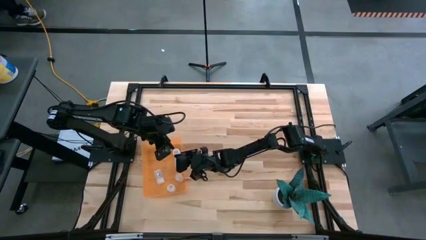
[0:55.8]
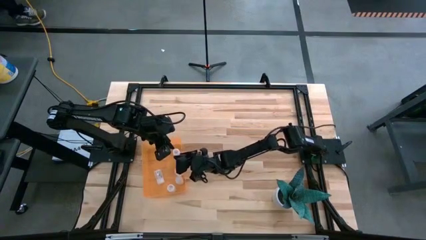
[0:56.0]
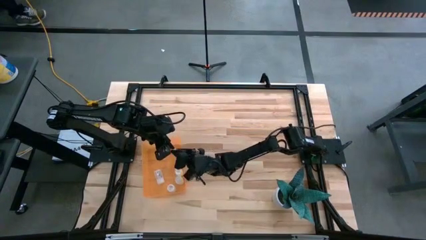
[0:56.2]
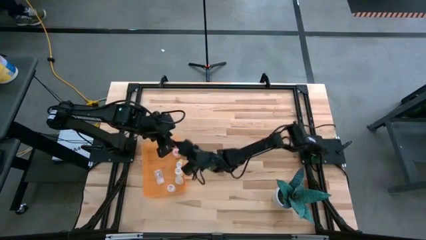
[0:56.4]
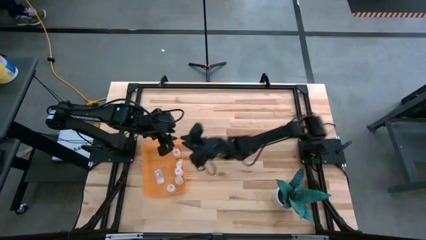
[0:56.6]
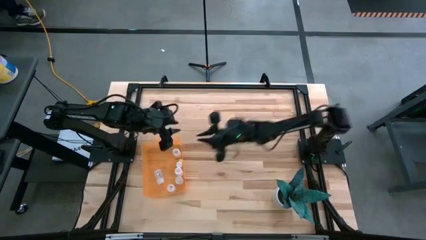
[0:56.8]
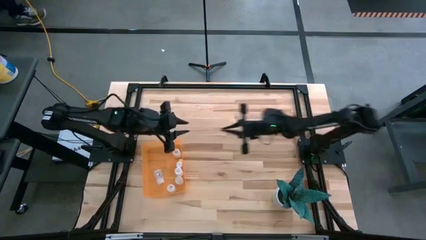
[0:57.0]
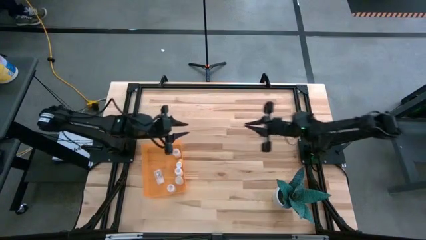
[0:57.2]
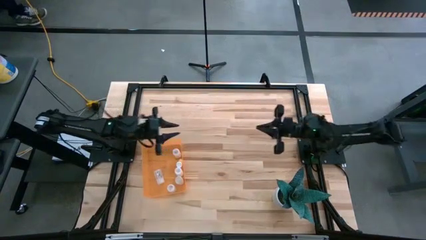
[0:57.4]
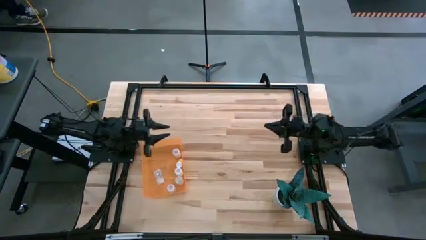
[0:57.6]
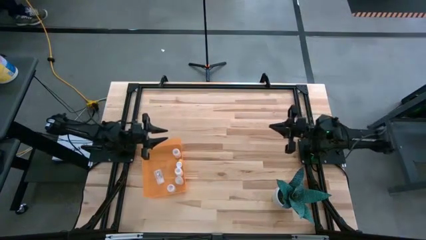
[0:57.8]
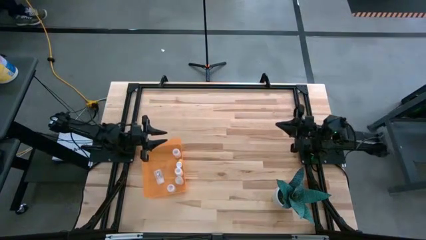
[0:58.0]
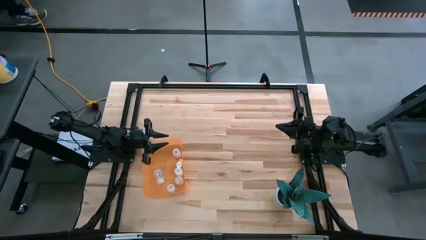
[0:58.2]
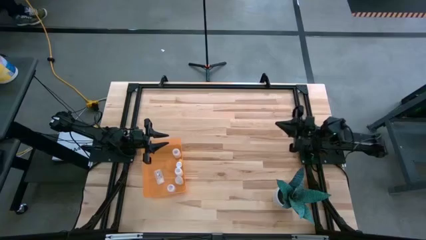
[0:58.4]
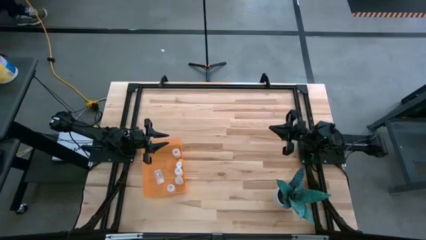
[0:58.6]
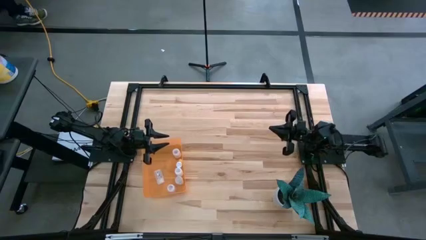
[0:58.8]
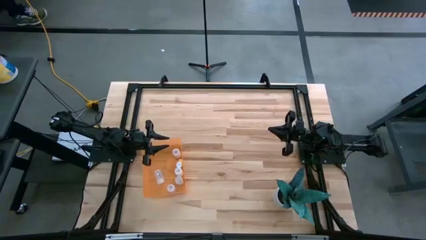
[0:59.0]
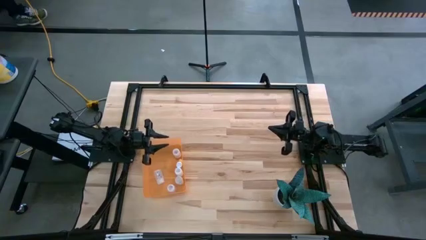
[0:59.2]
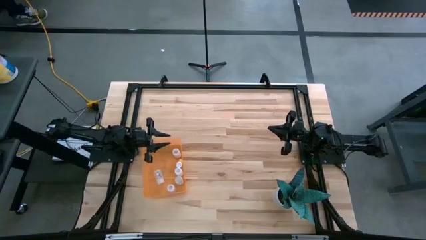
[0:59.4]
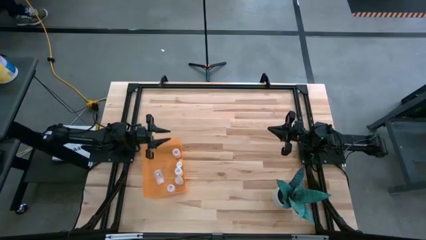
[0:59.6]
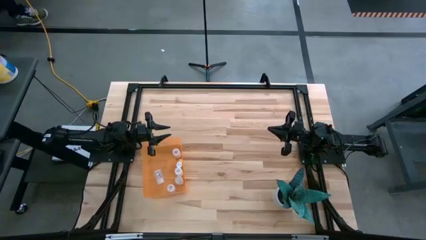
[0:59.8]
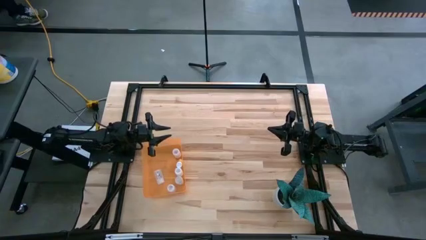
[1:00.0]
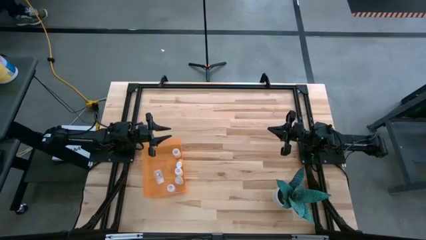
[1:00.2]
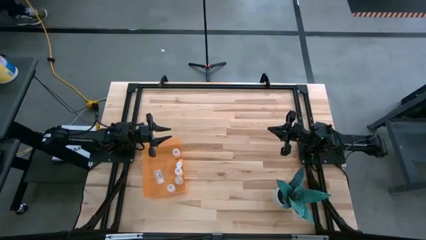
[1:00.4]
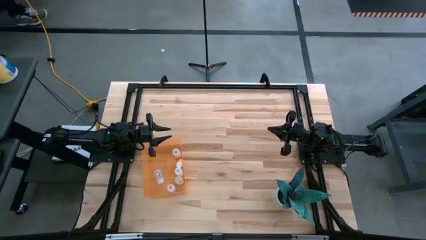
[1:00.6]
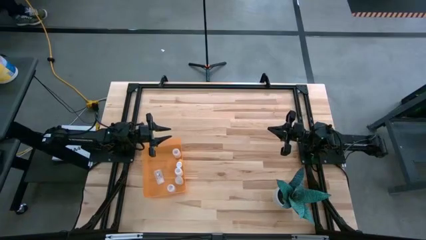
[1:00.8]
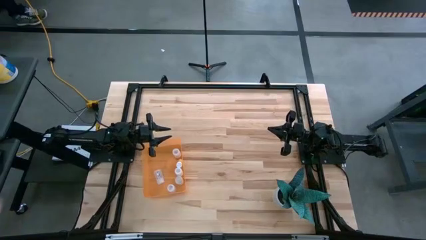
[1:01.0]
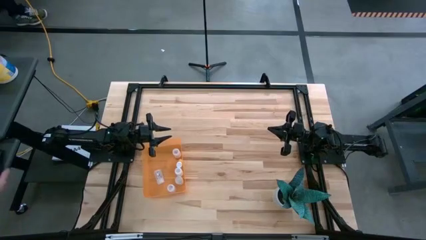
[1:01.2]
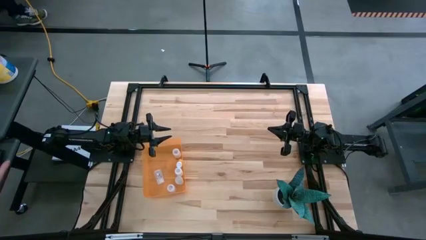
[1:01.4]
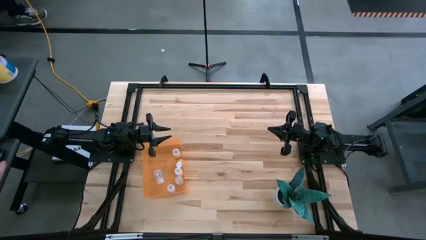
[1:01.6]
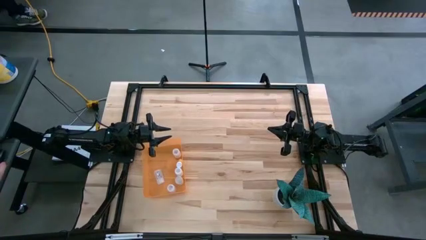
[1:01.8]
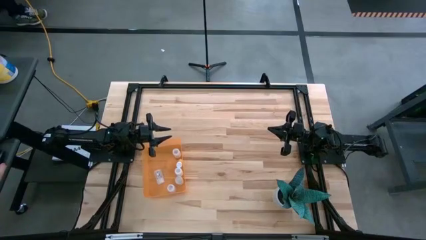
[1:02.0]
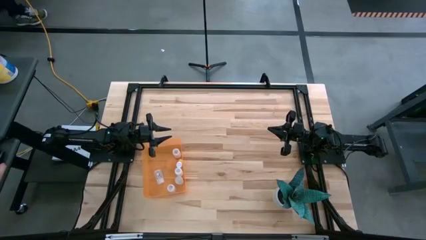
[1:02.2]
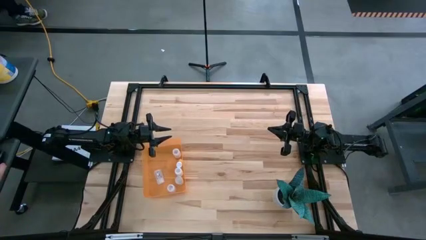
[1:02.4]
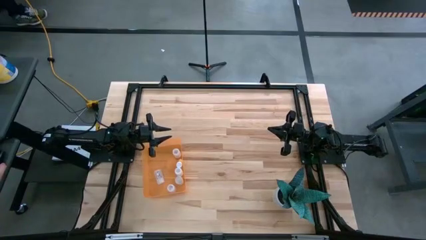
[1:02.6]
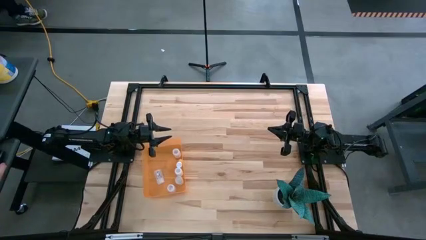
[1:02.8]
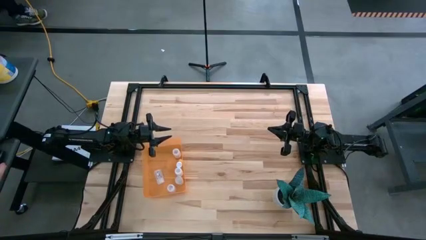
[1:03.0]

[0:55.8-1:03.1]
Task: Pick and place pill bottles into a basket
Return to Home Position

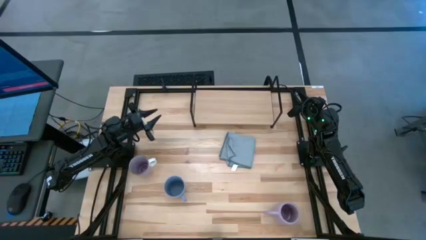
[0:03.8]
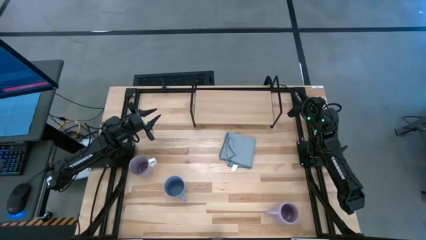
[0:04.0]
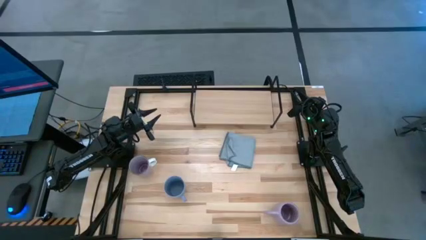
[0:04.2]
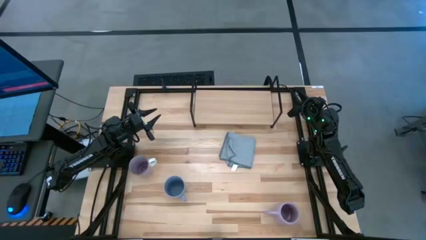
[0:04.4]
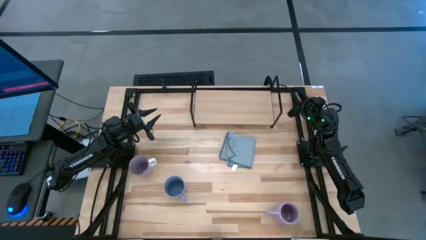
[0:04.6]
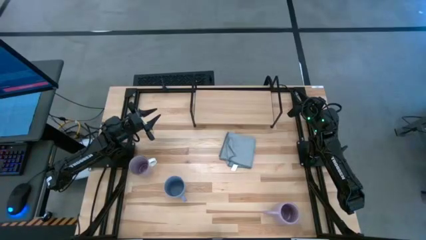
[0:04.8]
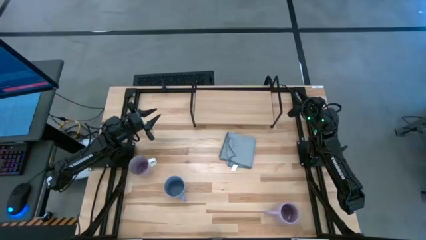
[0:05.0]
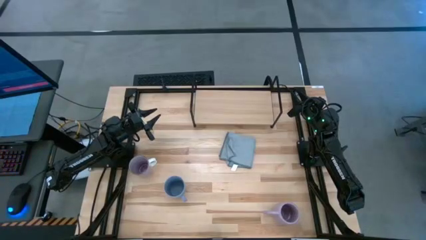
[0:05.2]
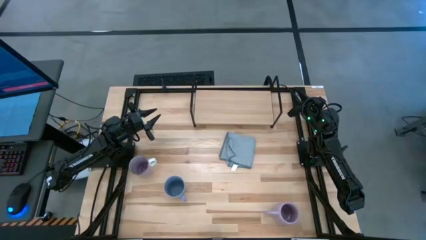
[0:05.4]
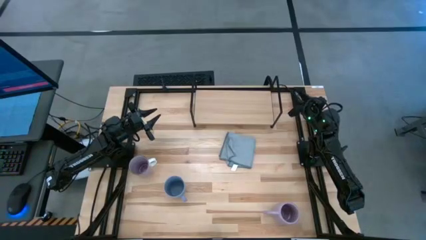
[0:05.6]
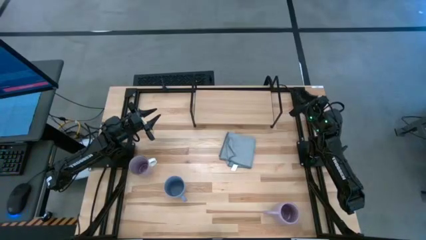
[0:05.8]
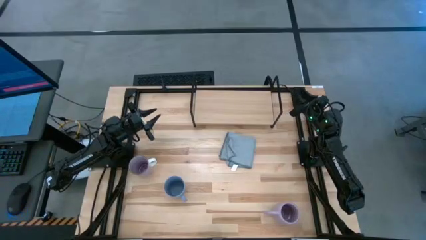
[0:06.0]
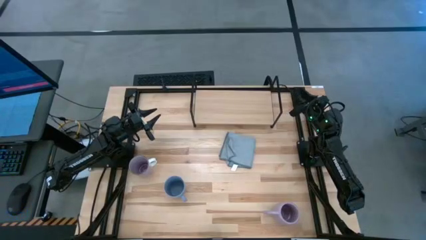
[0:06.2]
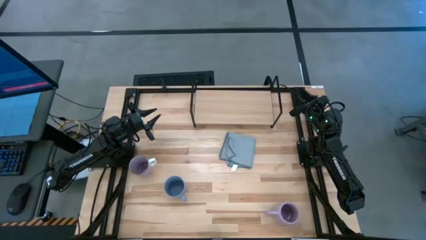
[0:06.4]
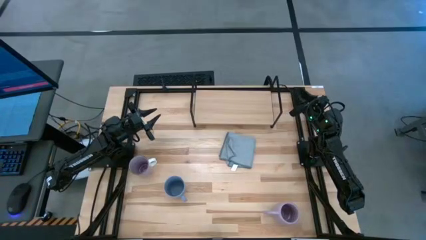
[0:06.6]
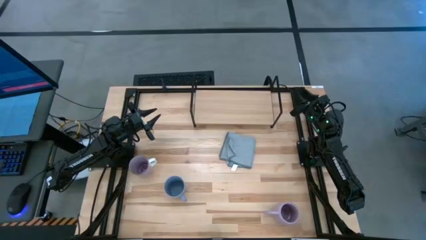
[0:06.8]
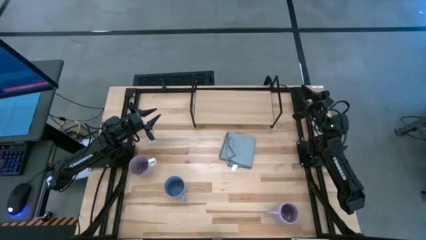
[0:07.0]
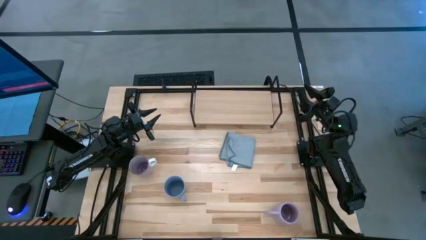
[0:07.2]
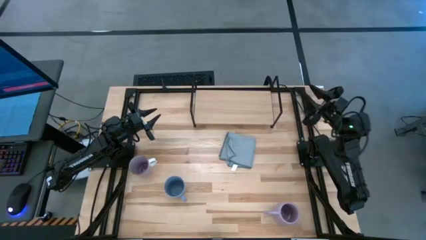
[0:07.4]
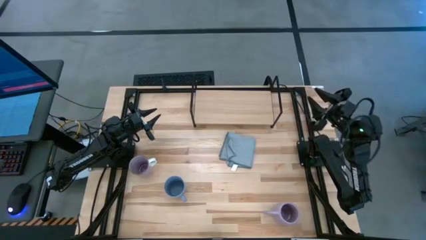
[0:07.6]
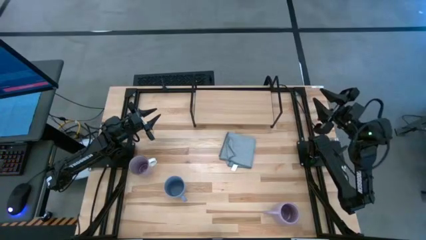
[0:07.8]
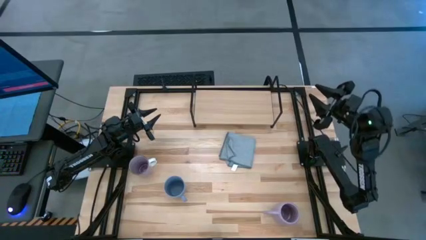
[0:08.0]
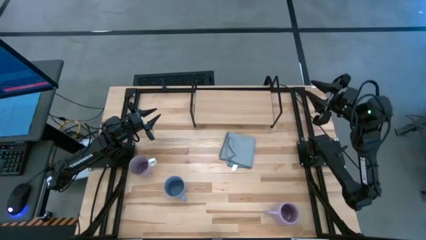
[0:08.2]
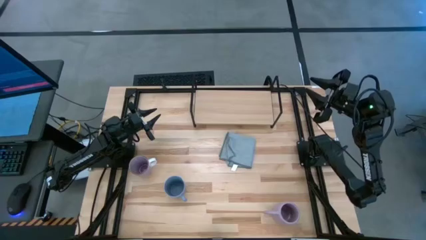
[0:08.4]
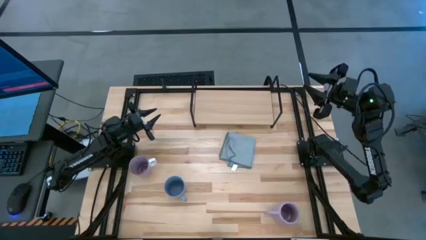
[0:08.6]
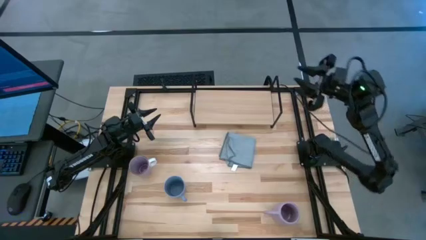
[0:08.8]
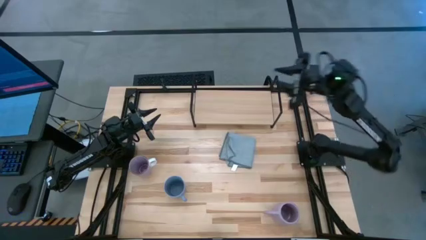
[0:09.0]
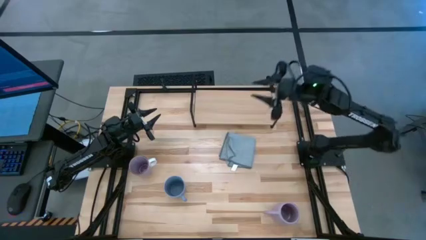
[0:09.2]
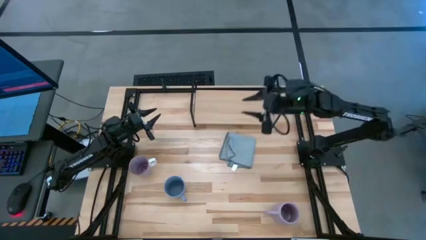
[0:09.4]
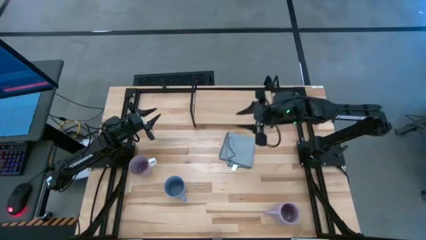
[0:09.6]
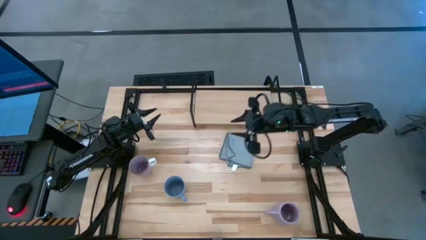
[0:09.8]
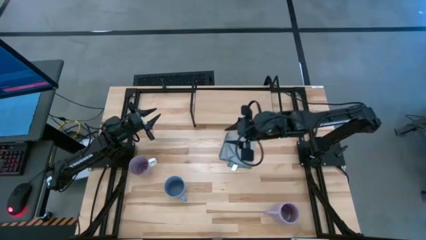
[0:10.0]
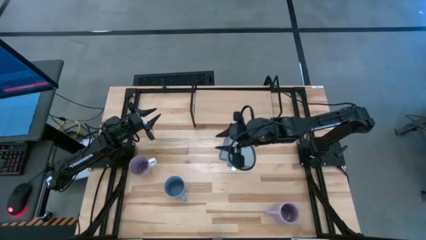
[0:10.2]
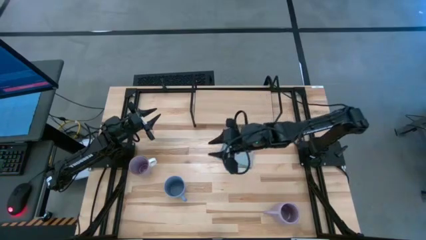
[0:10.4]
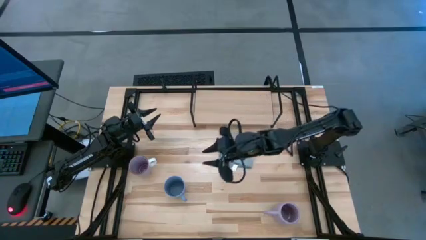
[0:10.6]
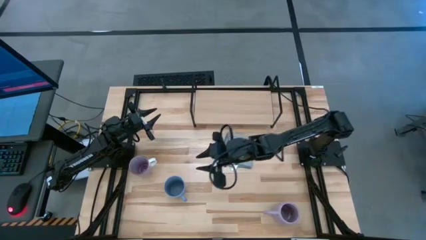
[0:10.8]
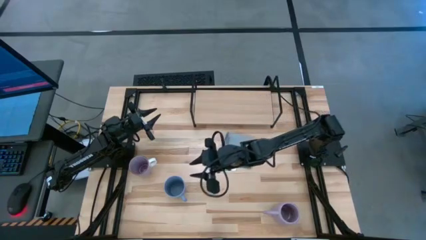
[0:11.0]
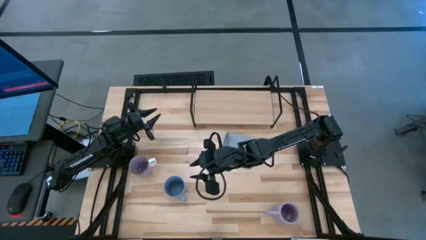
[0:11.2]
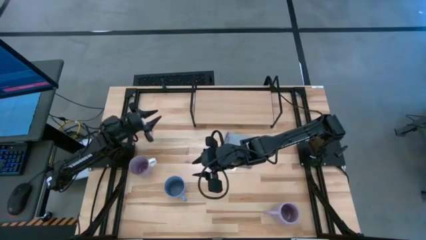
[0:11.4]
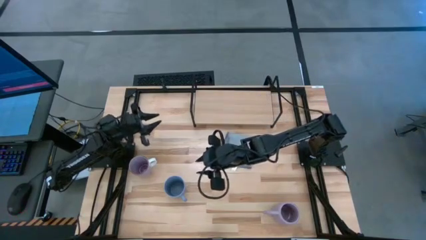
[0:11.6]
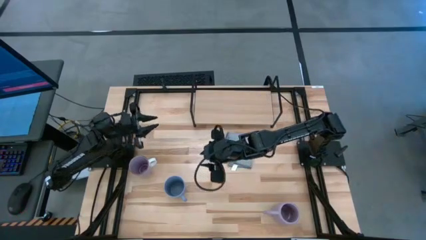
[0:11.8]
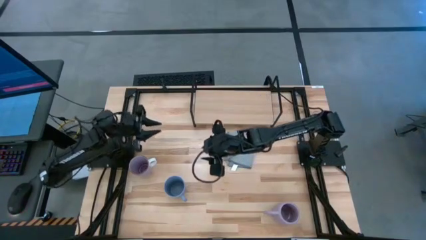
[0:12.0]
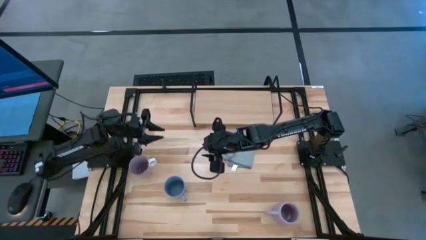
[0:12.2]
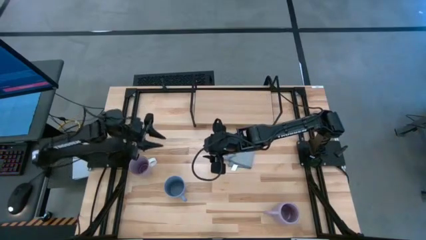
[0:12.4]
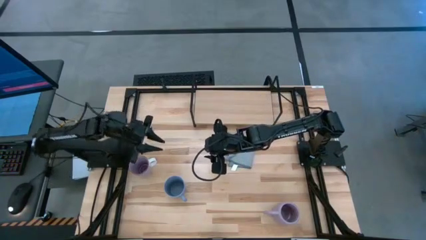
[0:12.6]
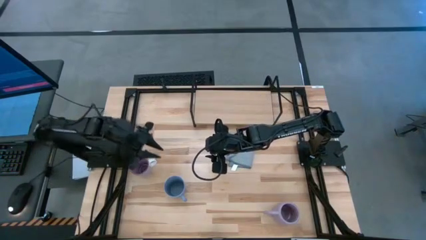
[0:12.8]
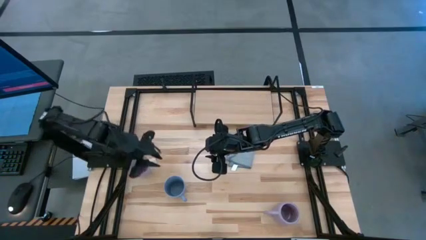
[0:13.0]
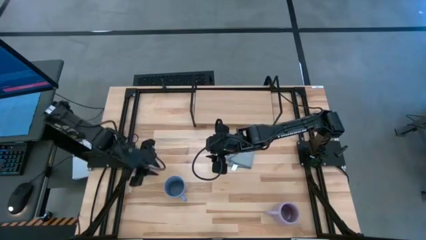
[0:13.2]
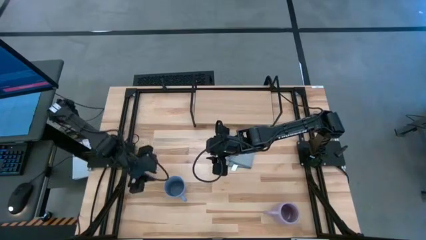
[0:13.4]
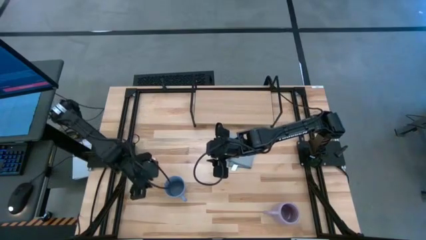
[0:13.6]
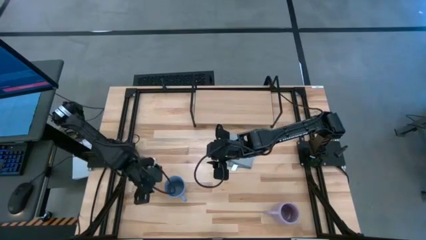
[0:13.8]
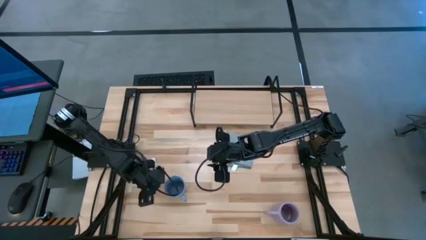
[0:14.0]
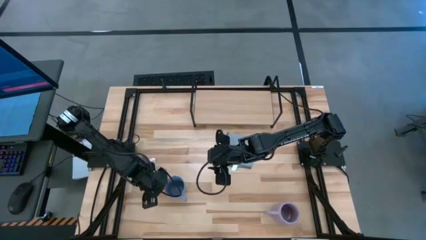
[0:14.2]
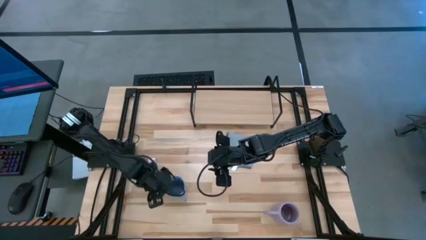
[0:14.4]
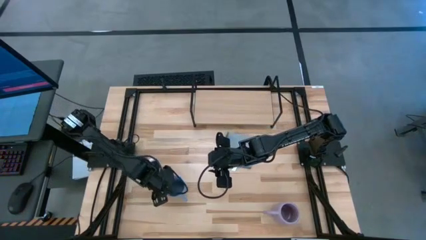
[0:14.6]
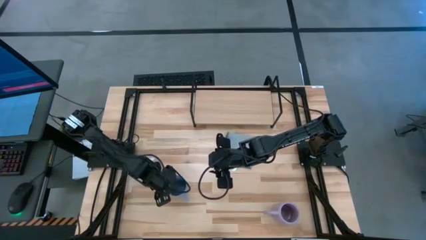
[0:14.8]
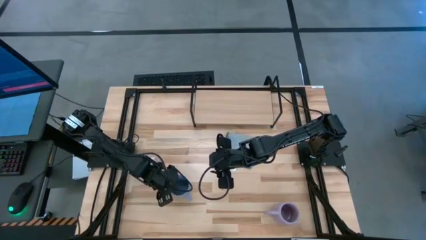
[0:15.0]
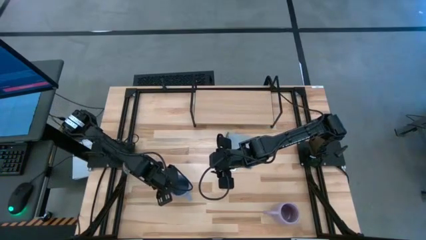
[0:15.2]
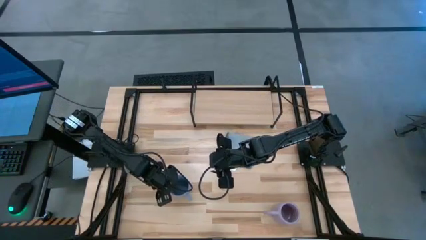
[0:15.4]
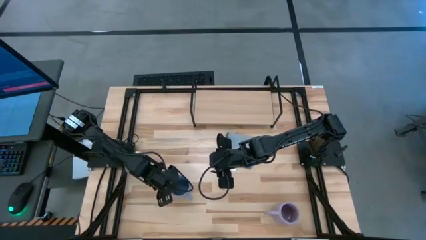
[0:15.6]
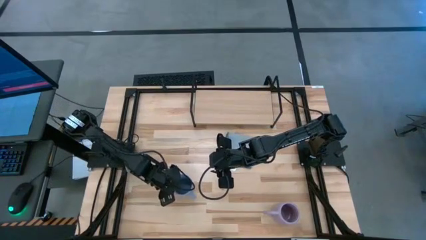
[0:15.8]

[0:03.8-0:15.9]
Task: Stack small to large cups/mugs on shelf
Put the blue mug on the shelf
